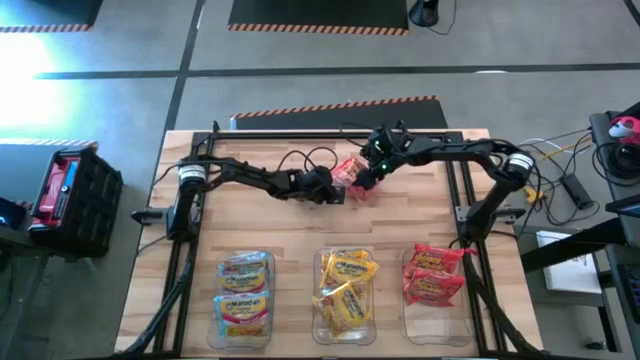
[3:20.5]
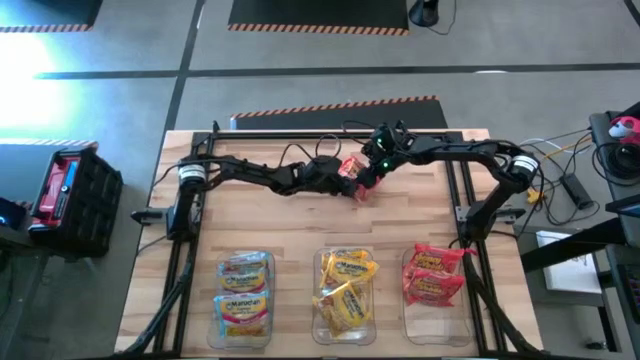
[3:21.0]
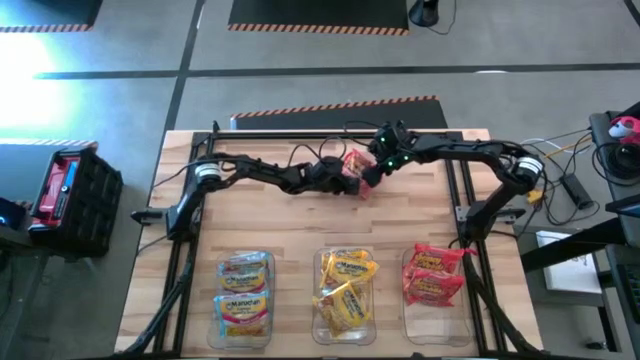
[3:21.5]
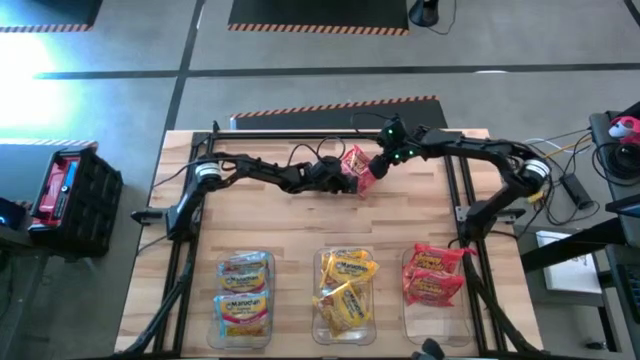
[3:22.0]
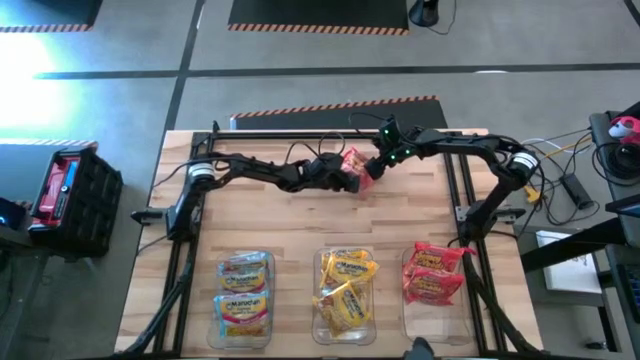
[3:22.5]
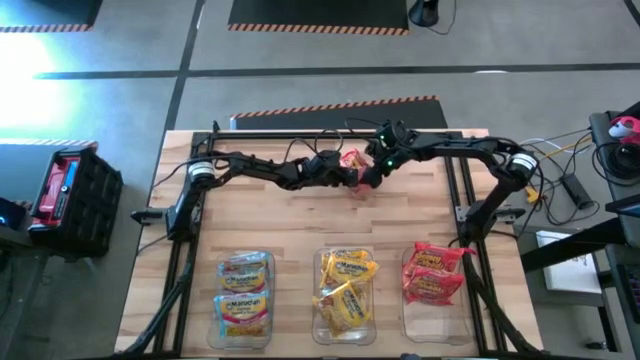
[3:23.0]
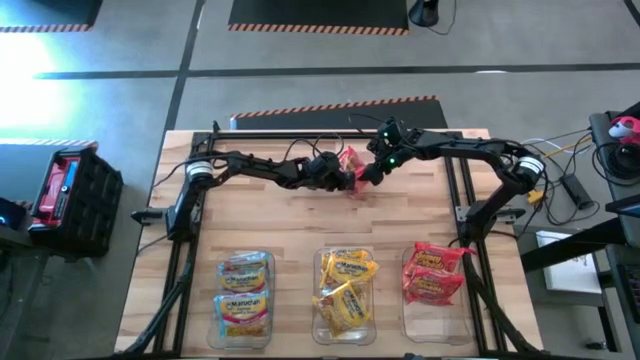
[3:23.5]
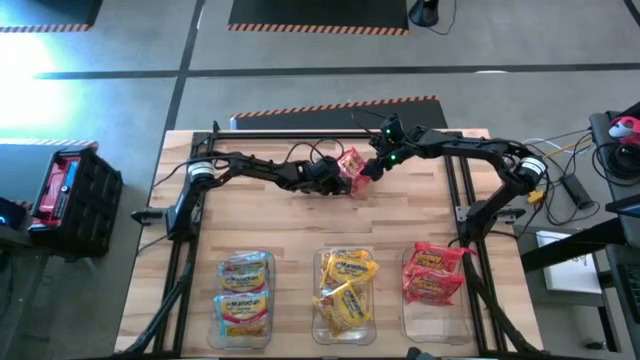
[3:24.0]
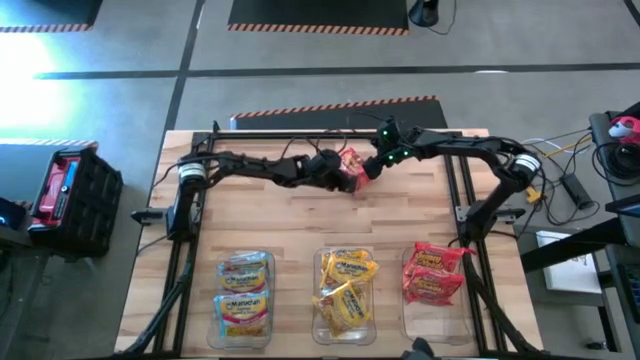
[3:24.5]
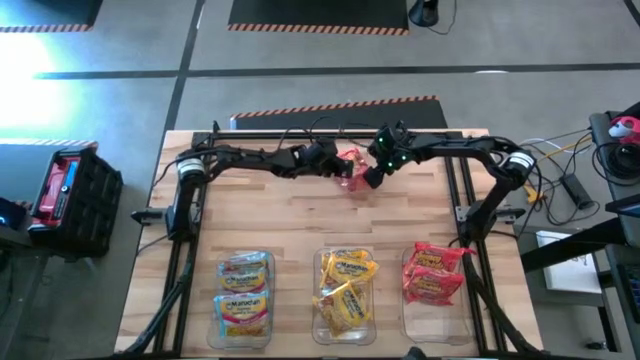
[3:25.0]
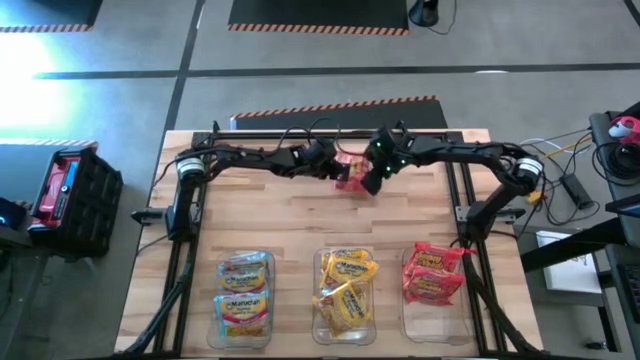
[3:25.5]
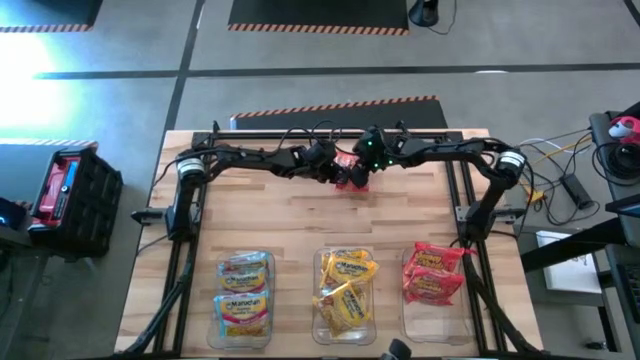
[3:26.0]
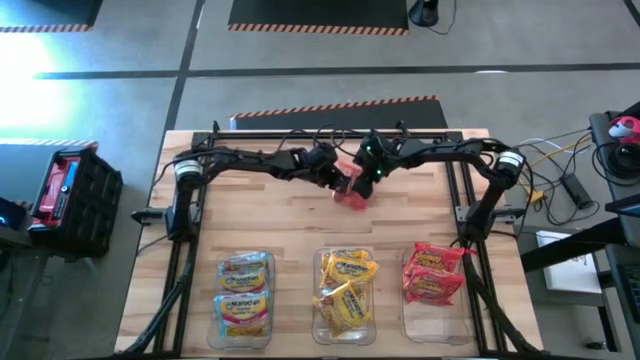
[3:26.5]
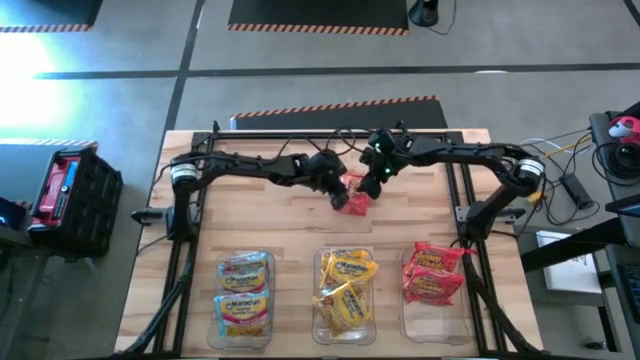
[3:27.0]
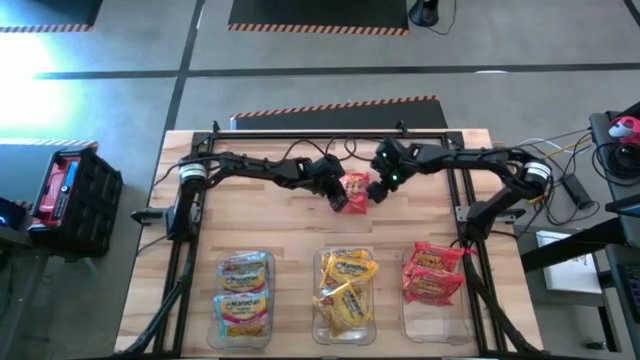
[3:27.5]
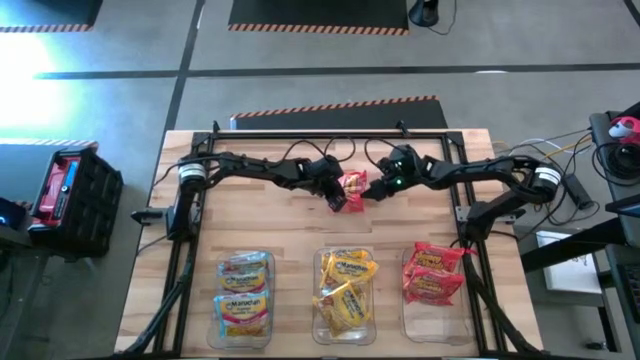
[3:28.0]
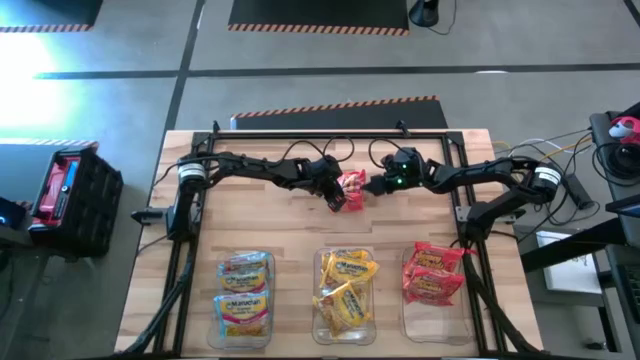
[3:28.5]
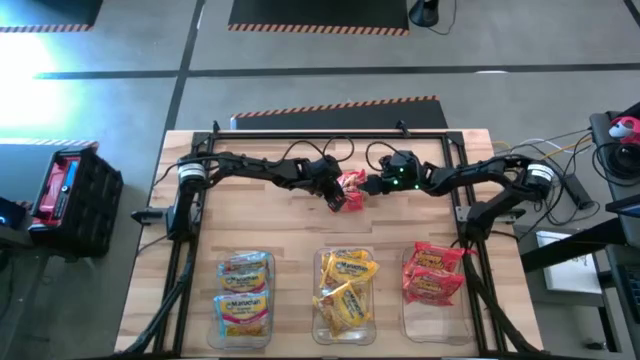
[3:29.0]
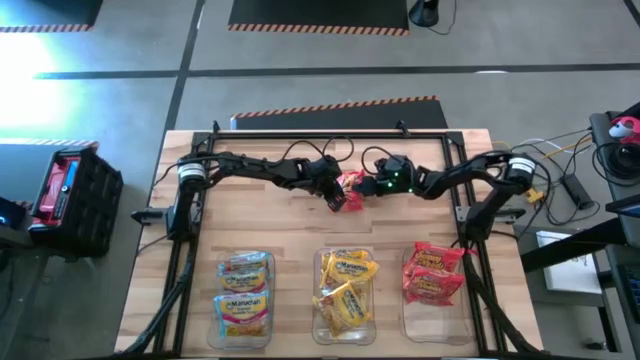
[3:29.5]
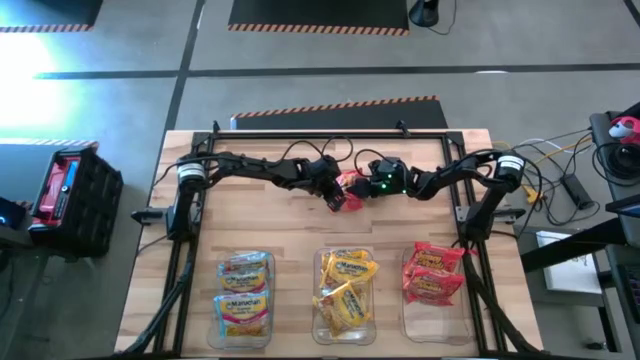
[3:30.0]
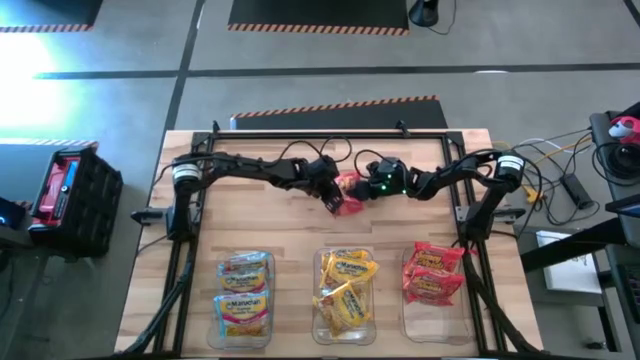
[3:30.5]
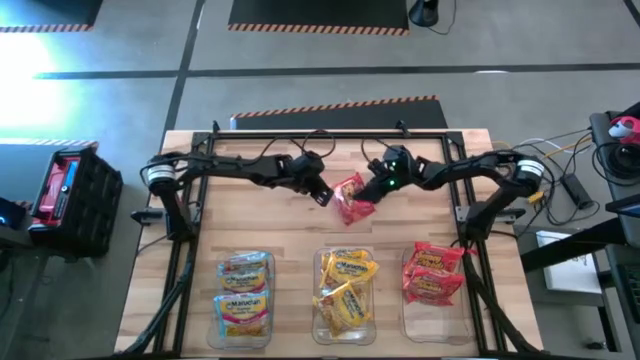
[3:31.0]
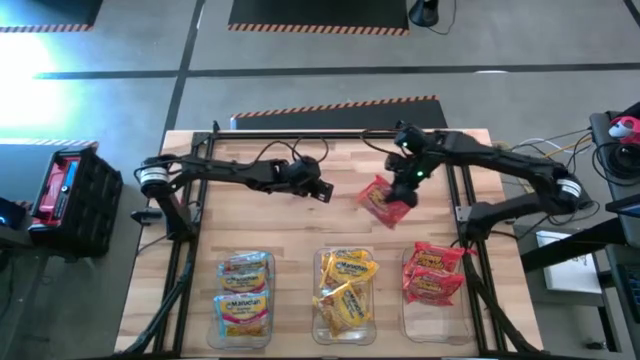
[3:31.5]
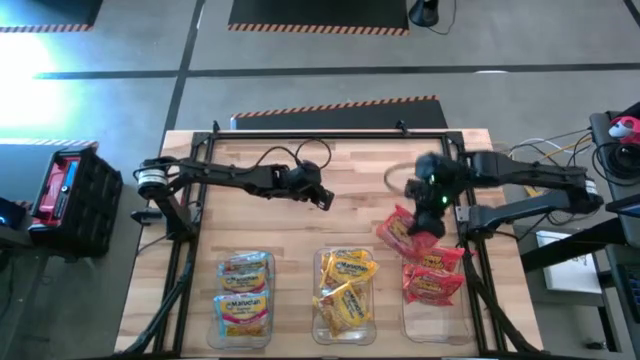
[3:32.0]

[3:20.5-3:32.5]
Task: Sort Maruchan noodles
Put the red noodle pack into the right transparent bin

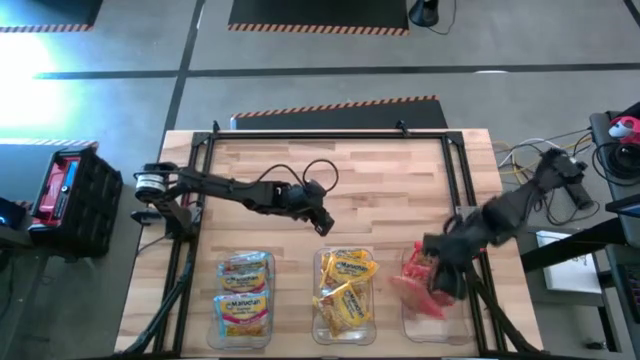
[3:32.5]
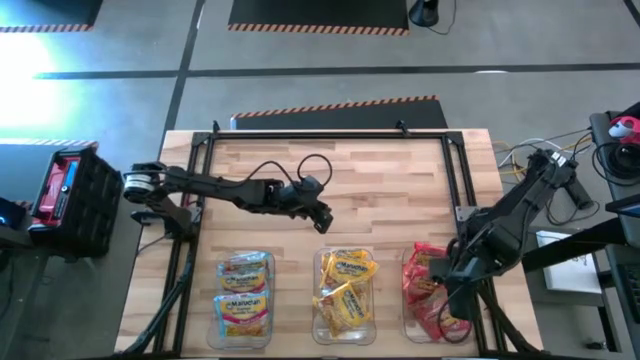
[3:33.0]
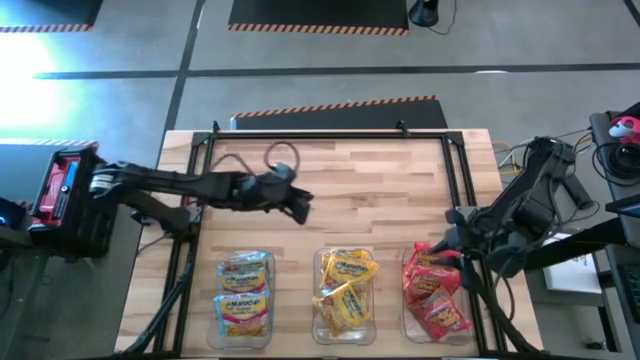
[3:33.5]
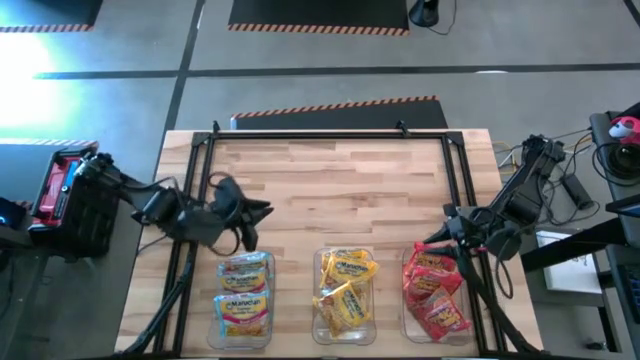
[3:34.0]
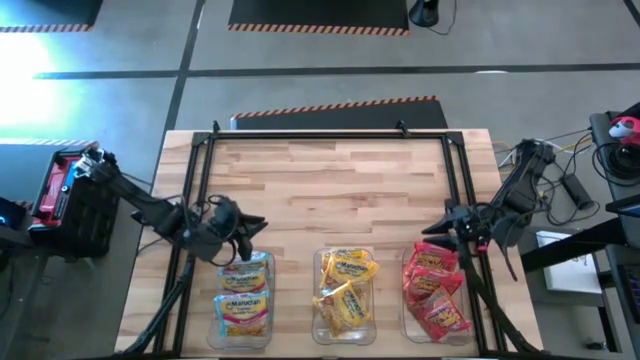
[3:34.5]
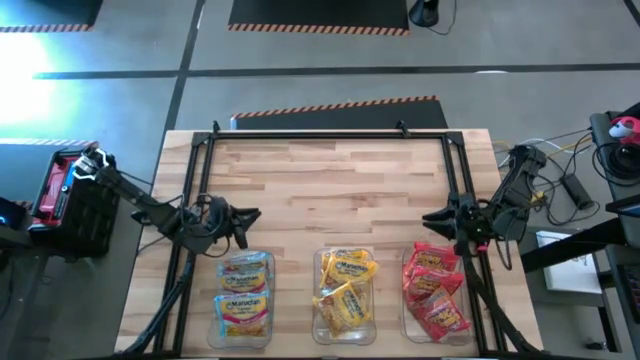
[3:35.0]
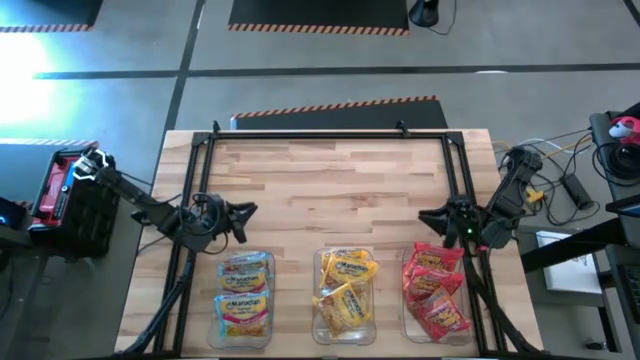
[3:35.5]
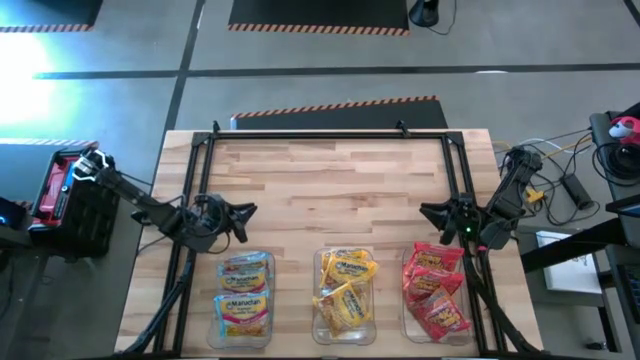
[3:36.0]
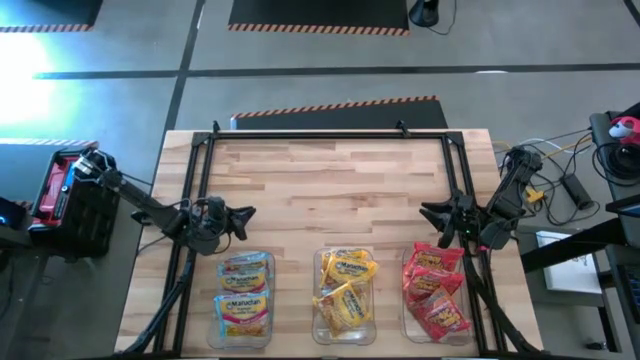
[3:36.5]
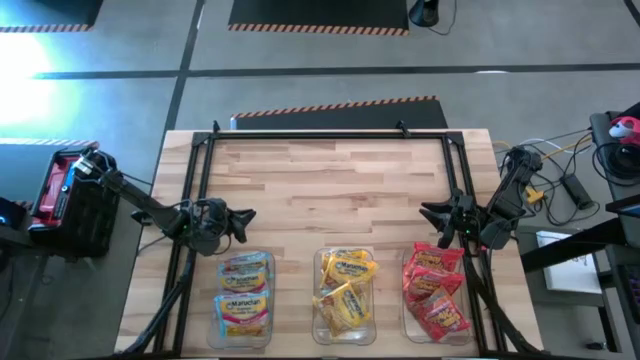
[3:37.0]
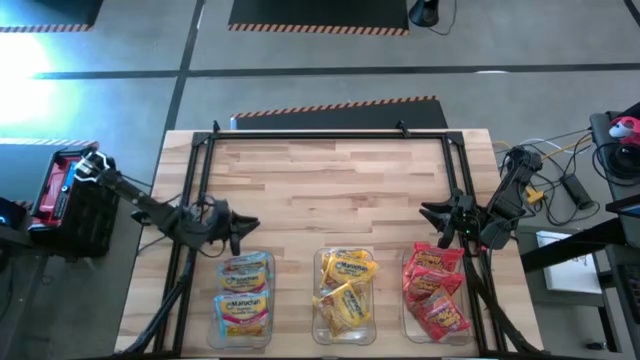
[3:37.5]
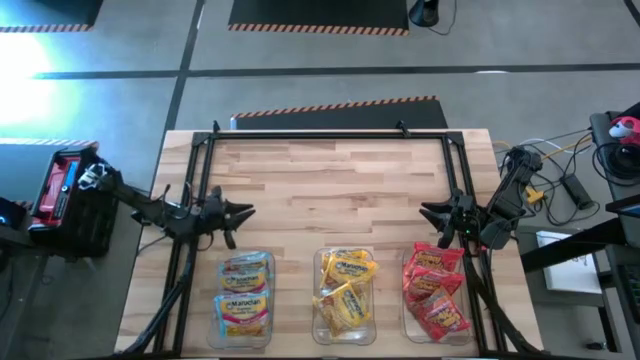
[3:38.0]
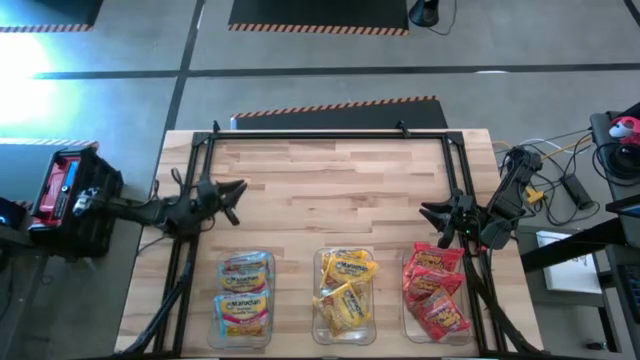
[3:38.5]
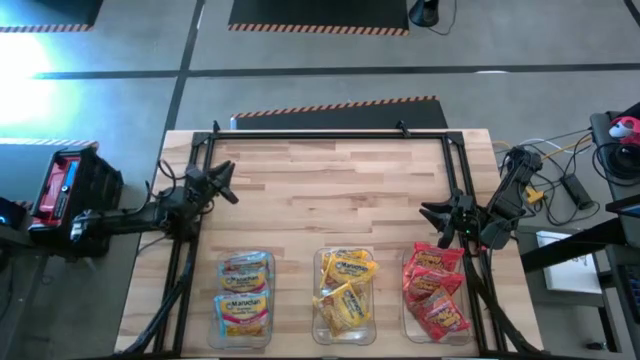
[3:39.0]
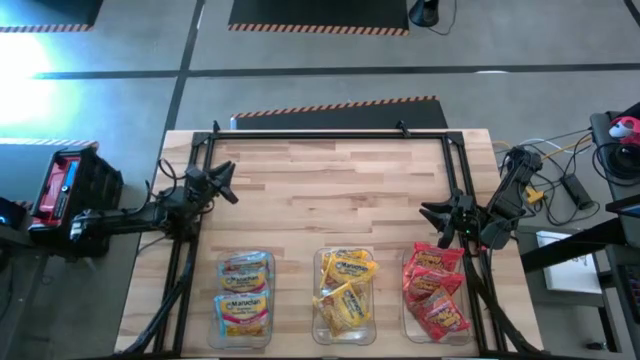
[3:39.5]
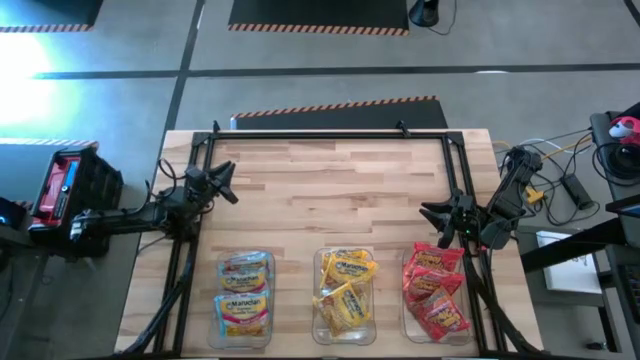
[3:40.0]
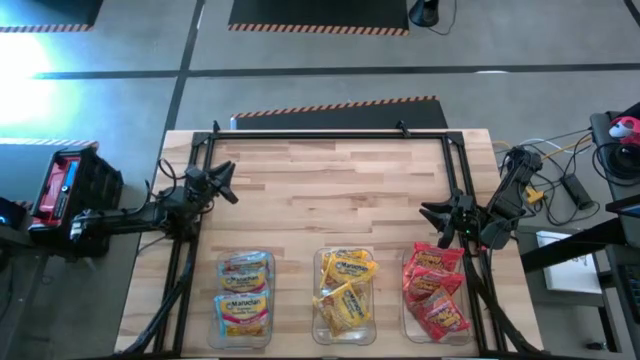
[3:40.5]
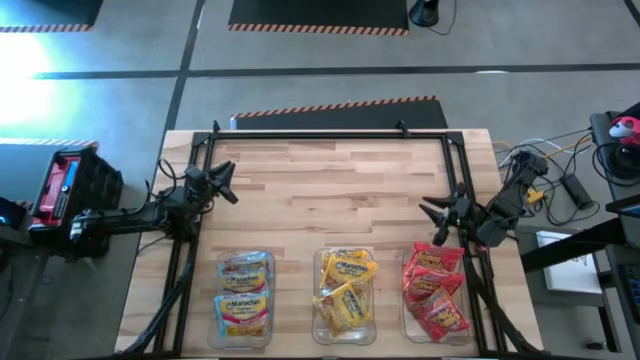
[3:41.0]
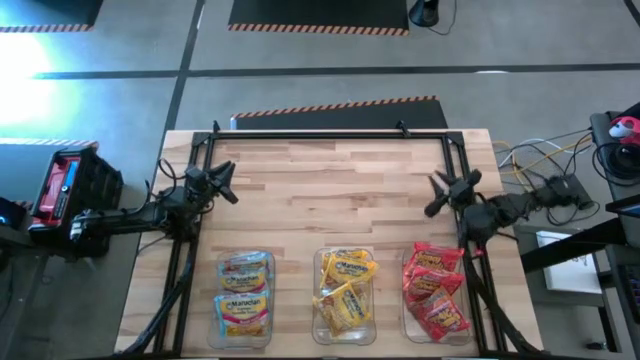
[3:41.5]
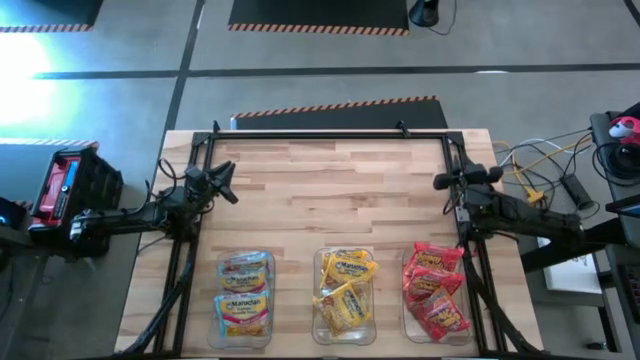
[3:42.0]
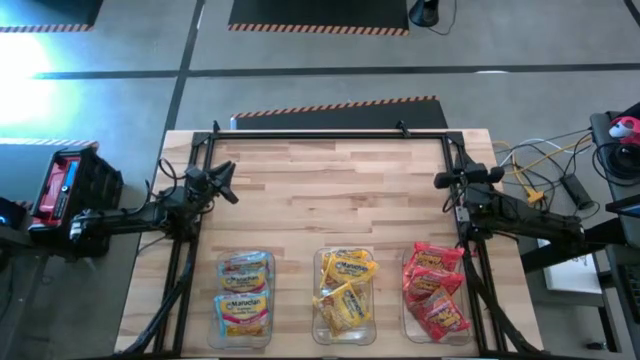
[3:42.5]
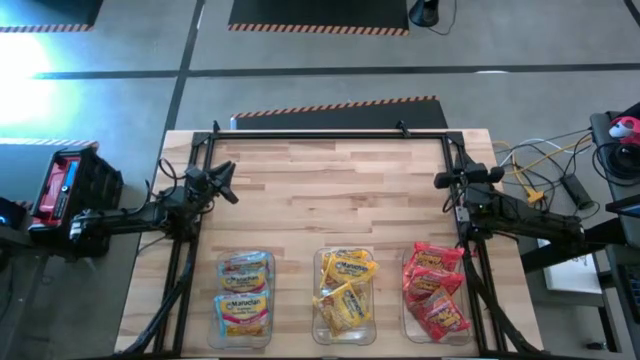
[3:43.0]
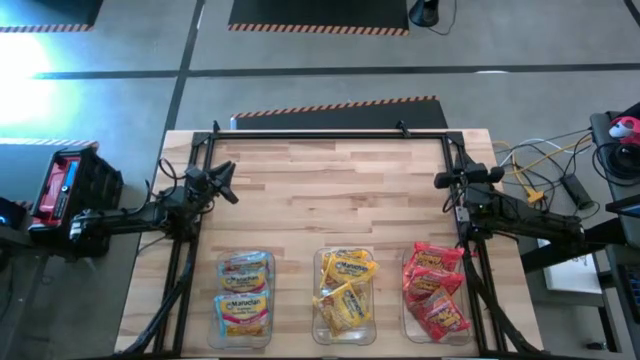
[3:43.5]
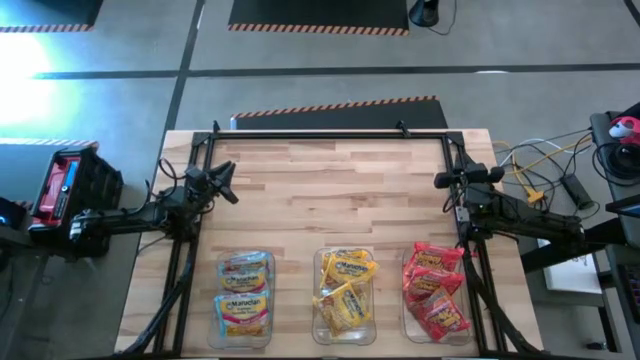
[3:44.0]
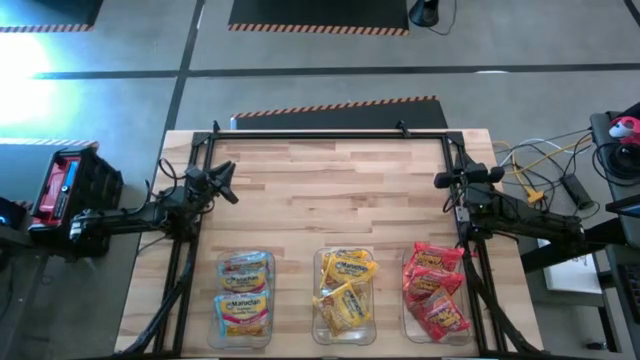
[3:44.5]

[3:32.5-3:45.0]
Return to Home Position
